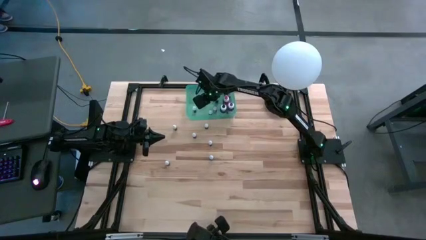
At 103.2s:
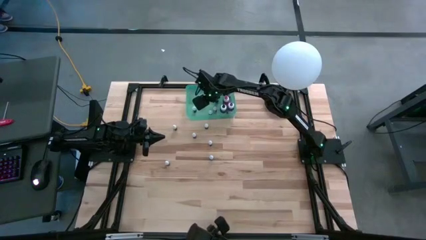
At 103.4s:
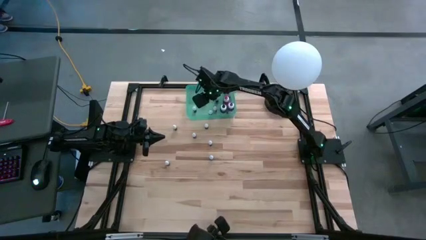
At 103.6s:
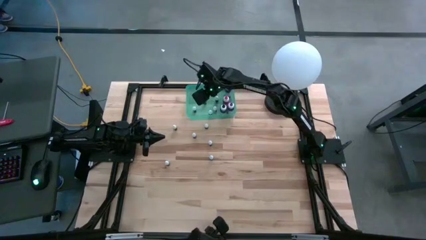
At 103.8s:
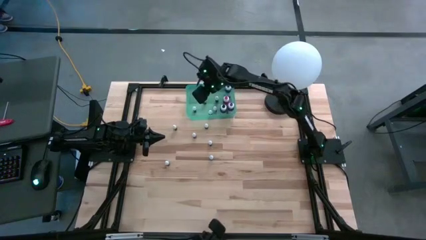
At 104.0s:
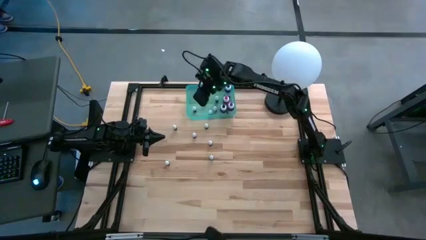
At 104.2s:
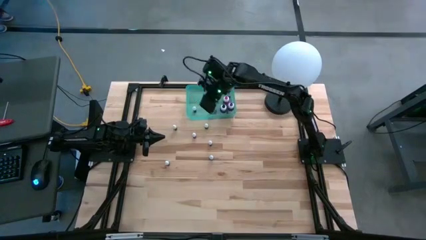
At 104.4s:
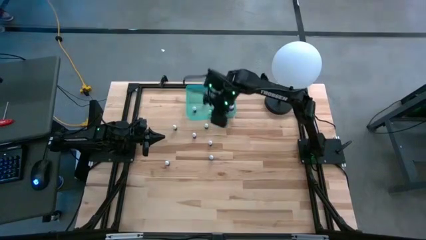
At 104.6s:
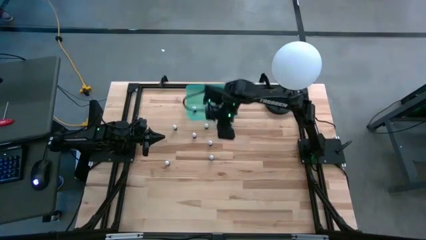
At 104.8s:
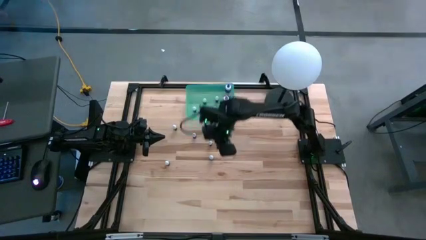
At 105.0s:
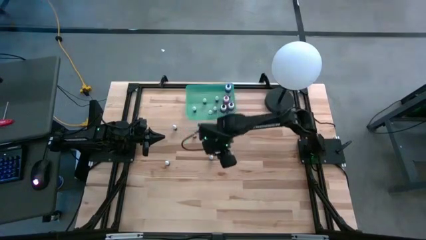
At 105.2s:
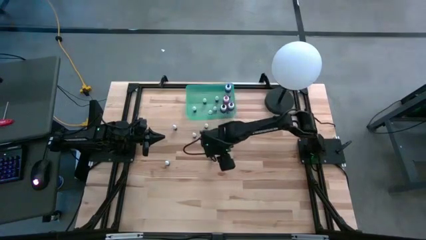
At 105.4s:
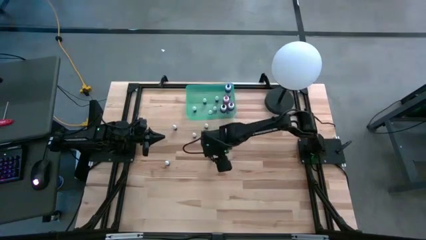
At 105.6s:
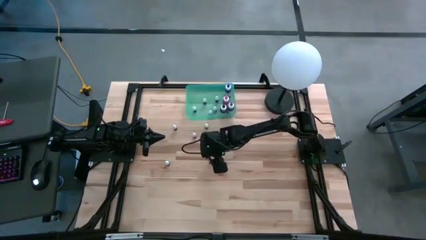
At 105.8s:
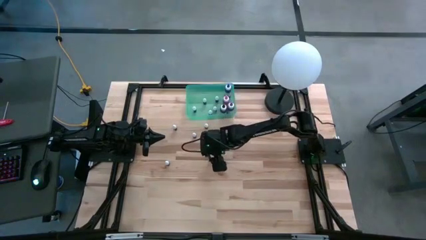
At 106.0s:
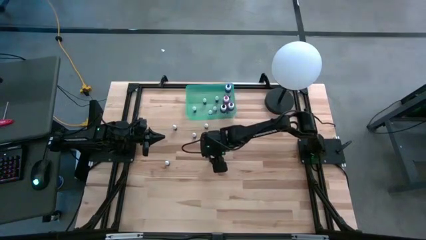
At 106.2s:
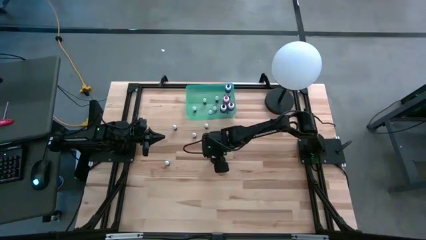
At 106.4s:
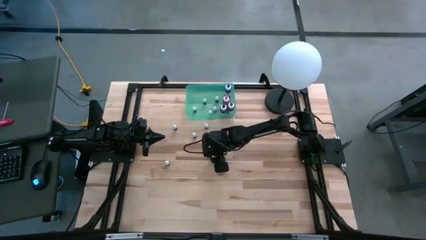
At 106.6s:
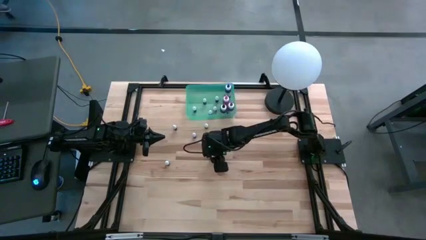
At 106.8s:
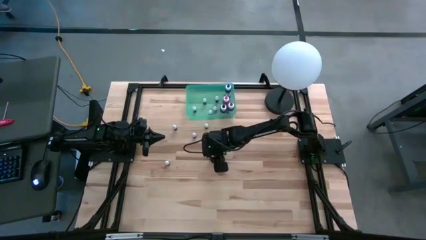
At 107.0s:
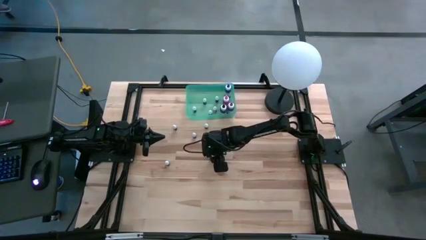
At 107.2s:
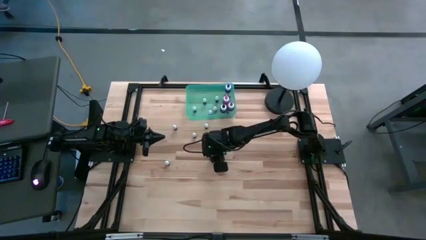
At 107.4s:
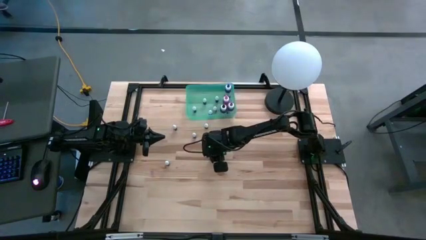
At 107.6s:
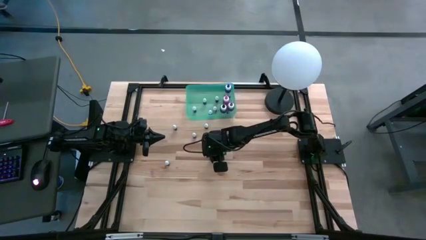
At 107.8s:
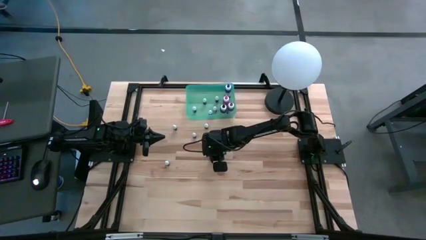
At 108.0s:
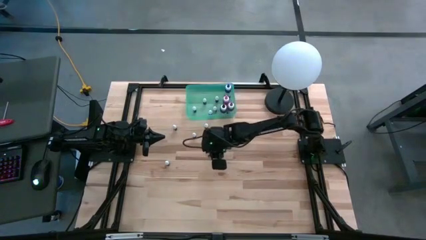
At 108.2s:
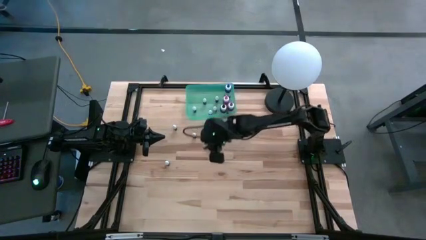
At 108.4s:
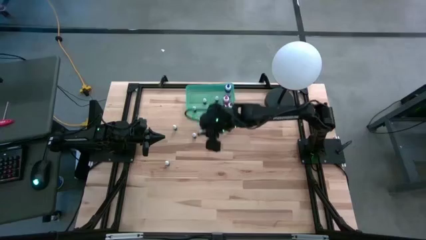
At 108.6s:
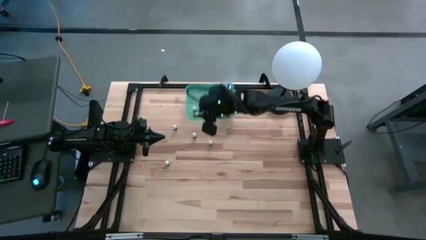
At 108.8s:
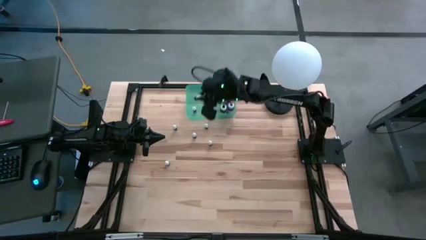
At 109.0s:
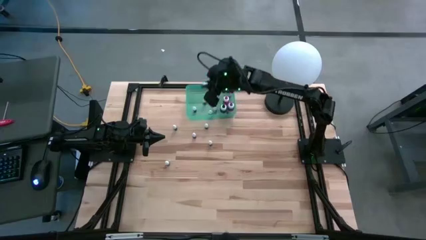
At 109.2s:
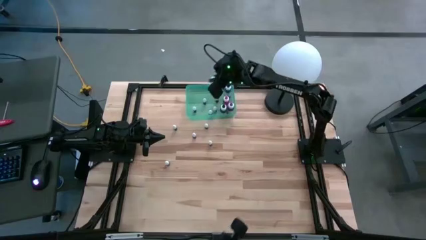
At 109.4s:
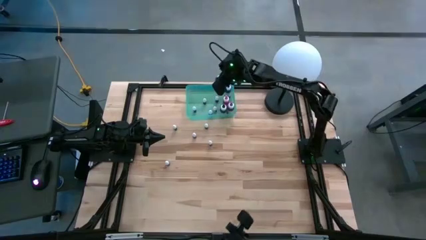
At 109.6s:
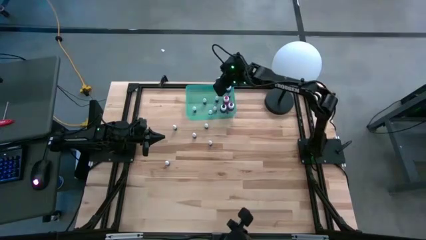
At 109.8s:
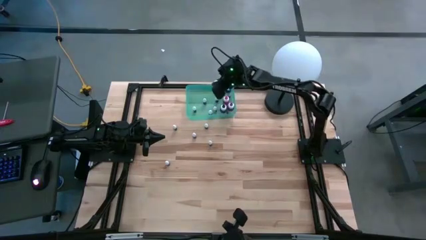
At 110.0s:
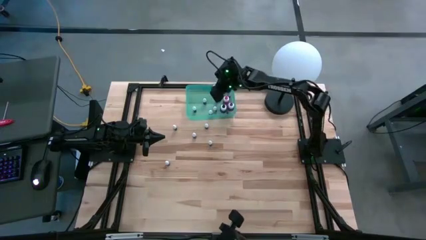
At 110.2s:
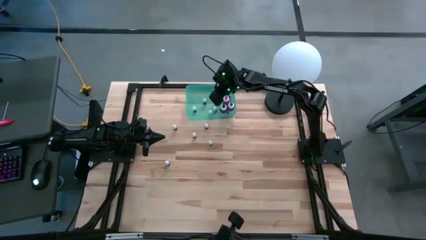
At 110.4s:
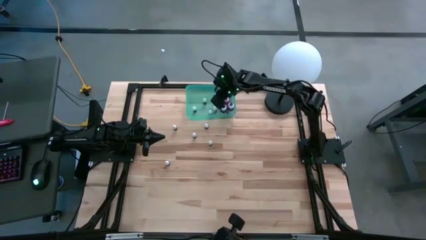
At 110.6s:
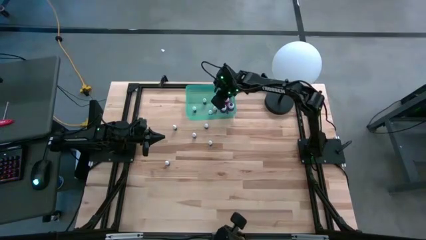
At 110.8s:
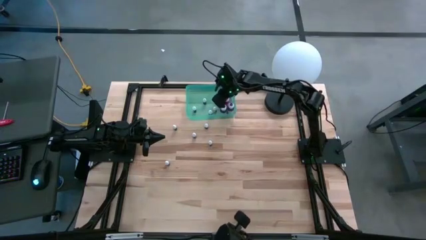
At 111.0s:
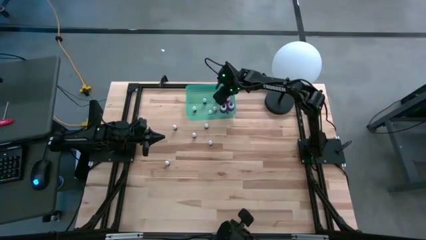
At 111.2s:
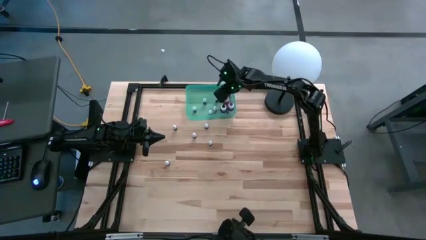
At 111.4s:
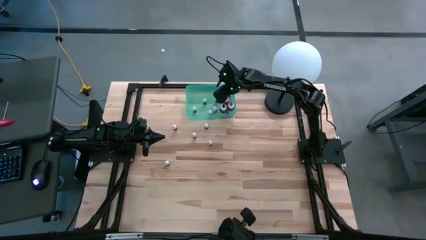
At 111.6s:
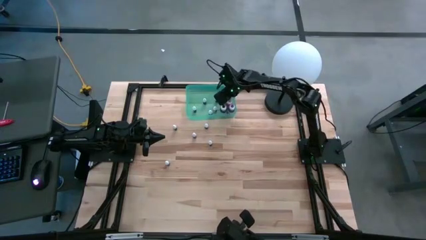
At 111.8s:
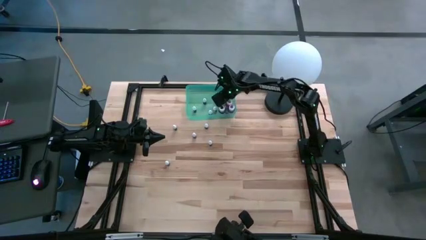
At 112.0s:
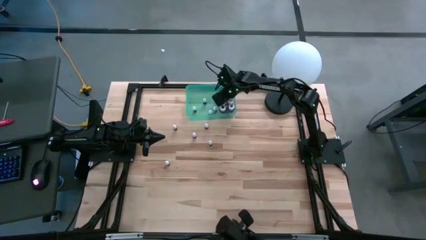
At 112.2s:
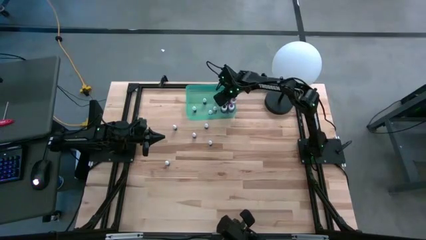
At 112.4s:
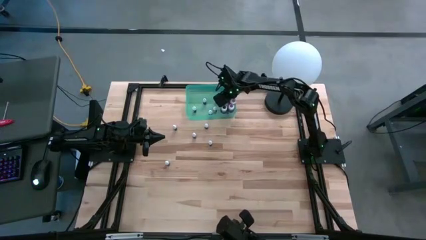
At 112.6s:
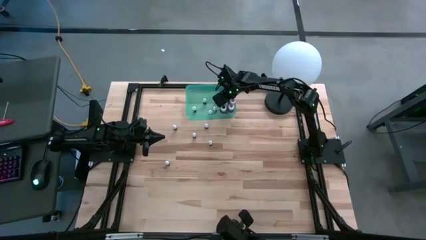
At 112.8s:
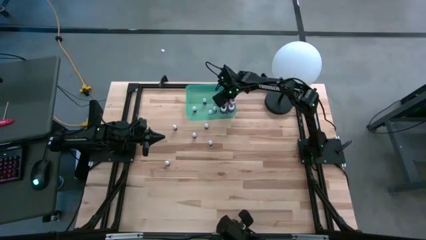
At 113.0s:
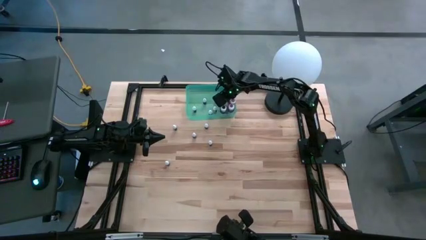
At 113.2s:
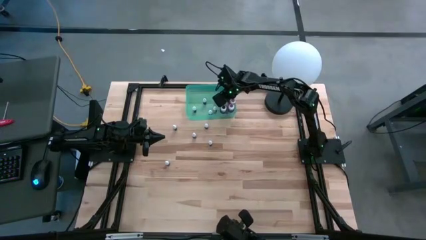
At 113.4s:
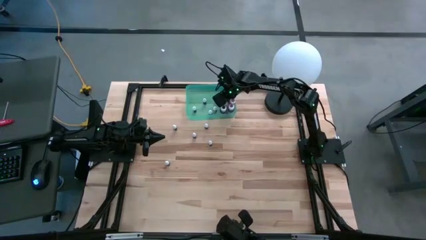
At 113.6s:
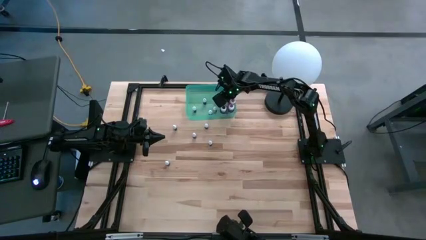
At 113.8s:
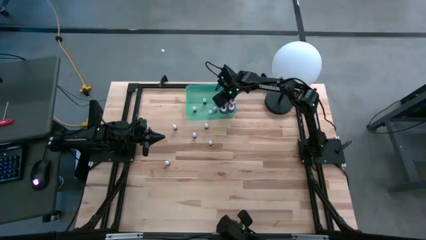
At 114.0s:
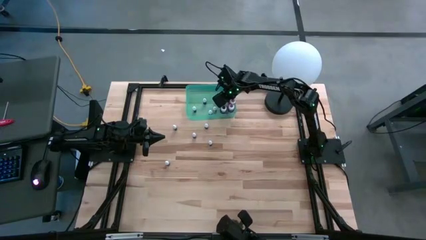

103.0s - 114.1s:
Task: Pick & Place food coloring
Put the small blue food coloring into the bin
